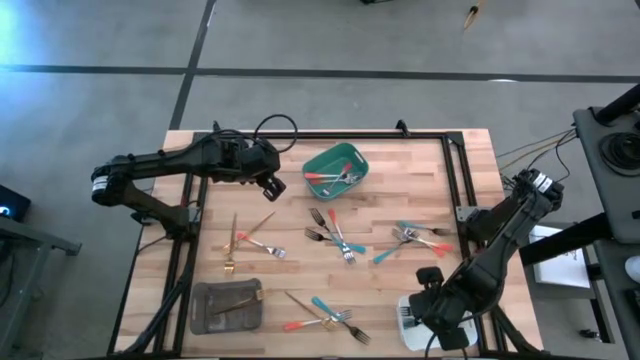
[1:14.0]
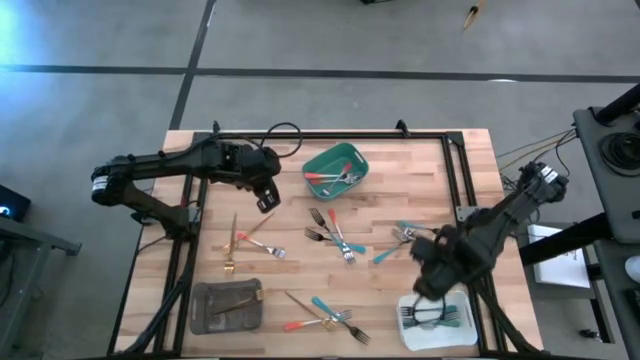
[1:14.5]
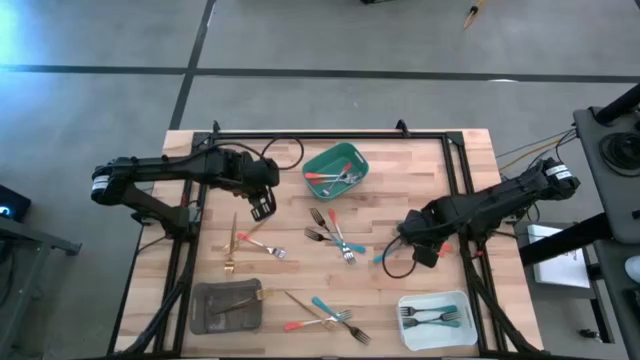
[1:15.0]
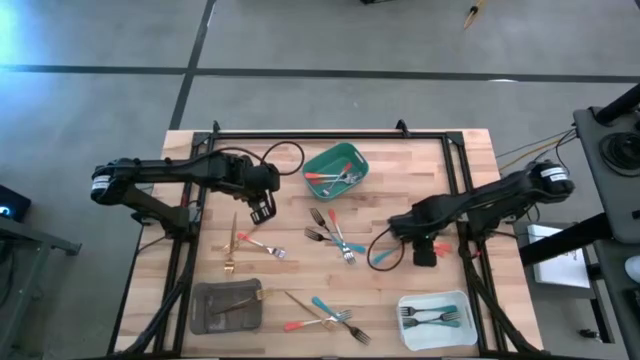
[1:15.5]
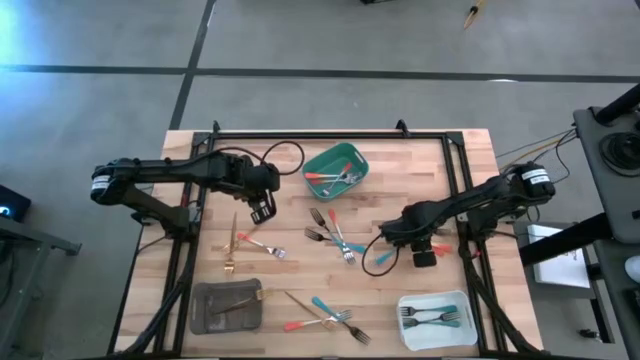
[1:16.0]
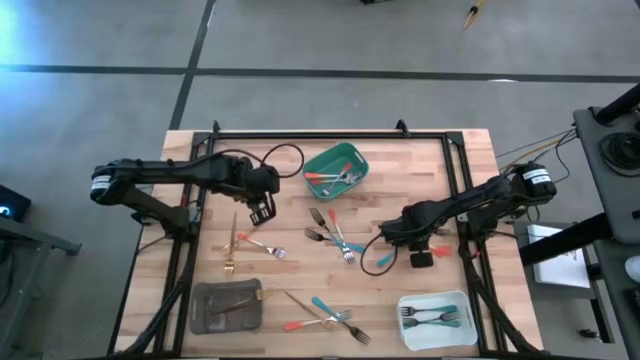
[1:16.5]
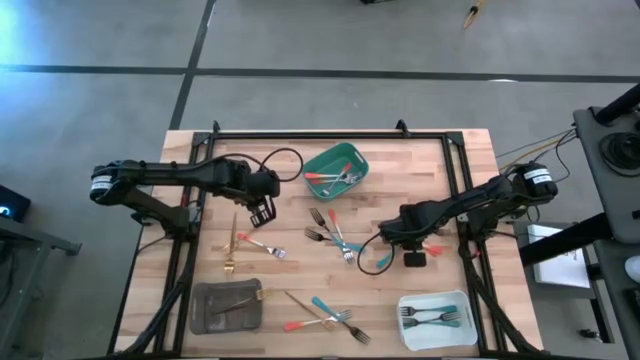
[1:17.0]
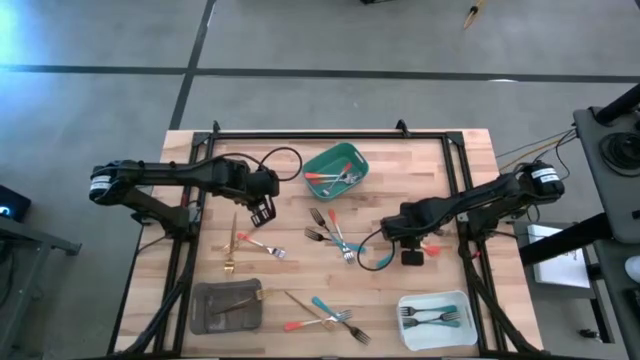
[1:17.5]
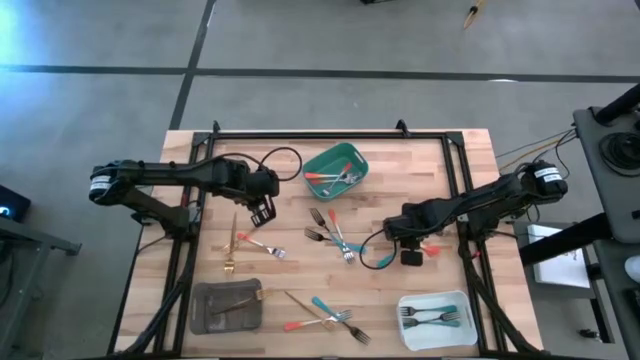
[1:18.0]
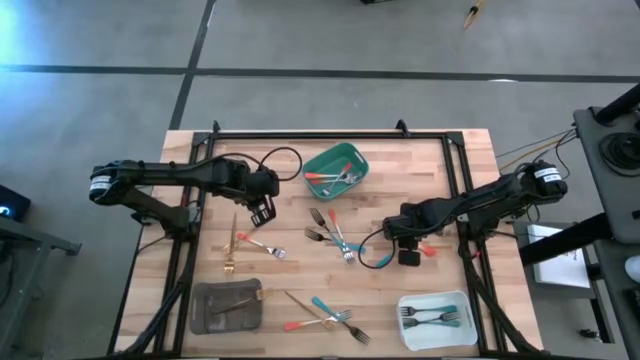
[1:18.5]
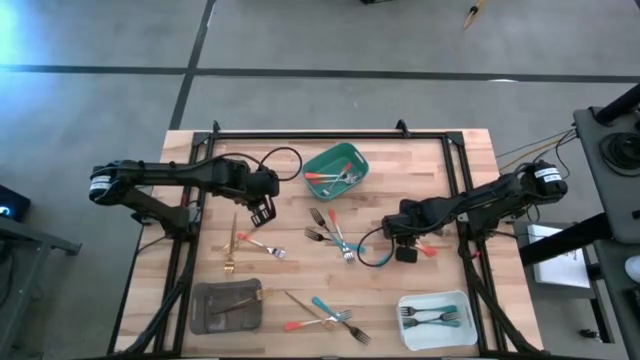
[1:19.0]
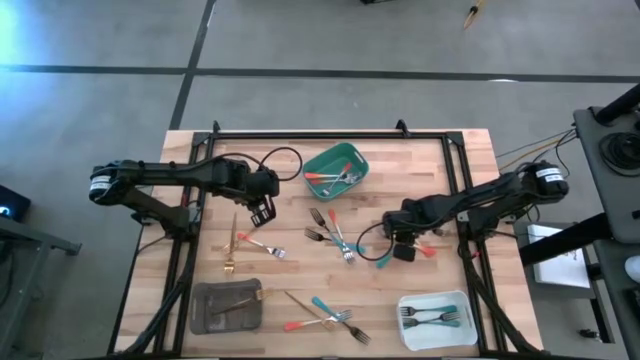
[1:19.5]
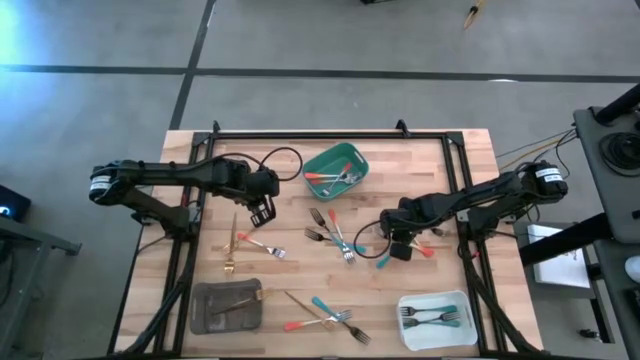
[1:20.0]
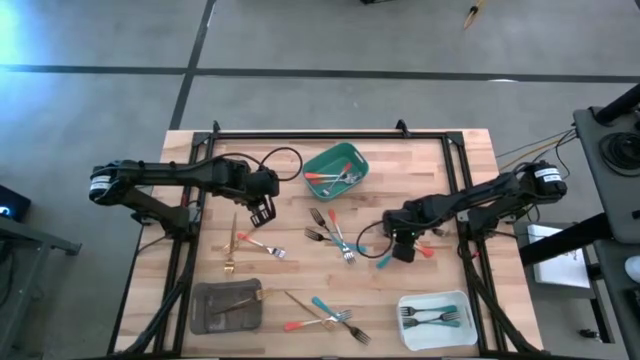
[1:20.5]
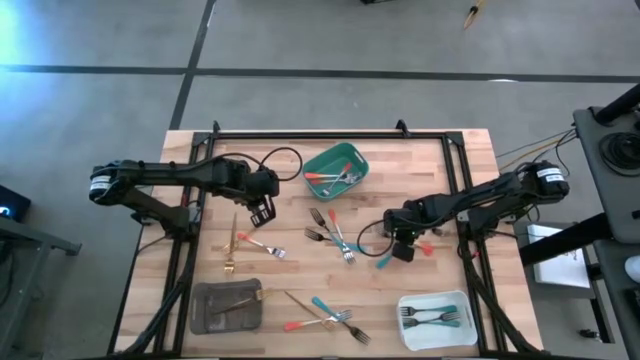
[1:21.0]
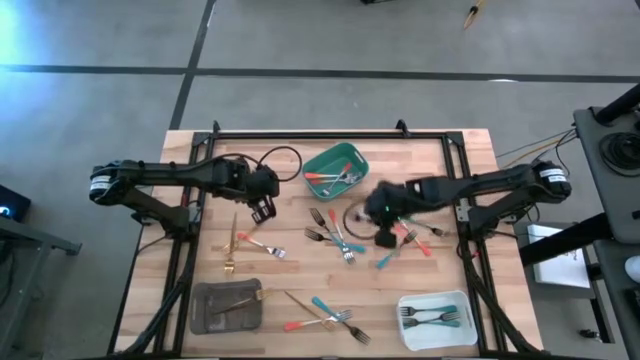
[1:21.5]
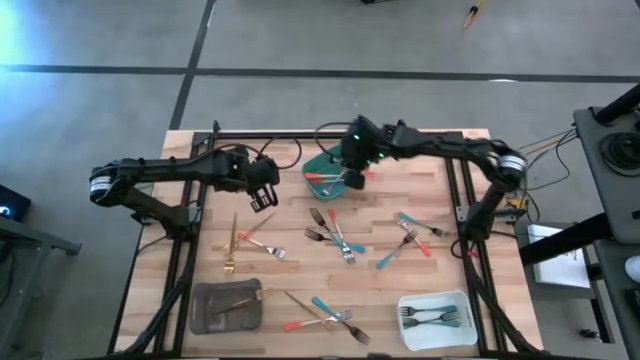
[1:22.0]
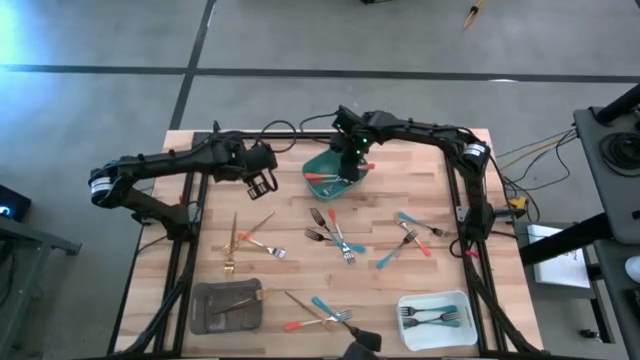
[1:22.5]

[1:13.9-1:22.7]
Task: Sort silverware by color (type)
Put the orange fork into the green bin

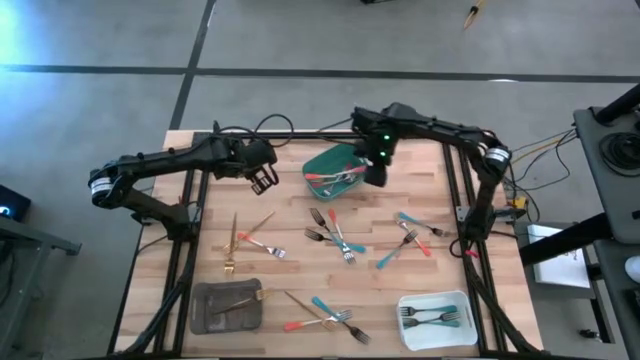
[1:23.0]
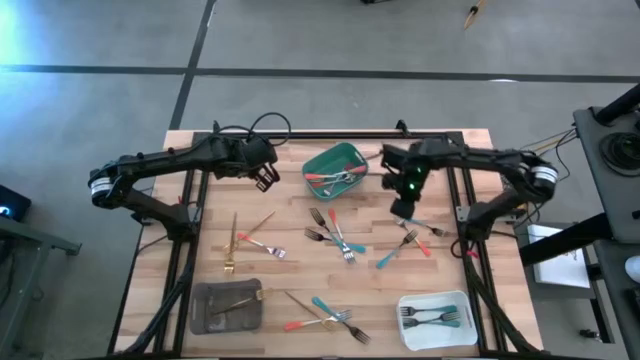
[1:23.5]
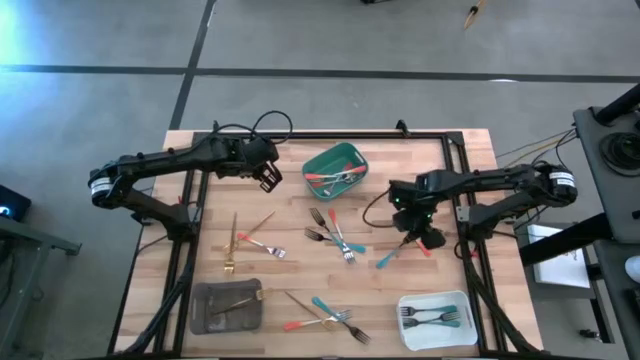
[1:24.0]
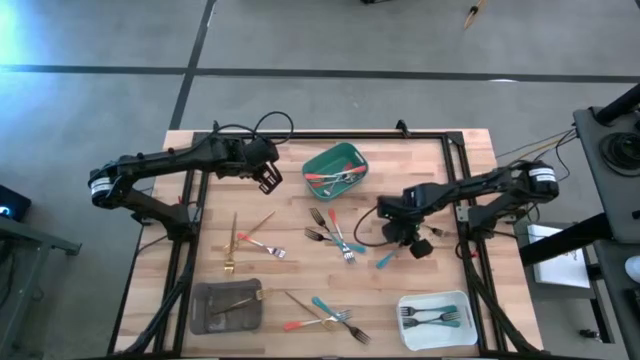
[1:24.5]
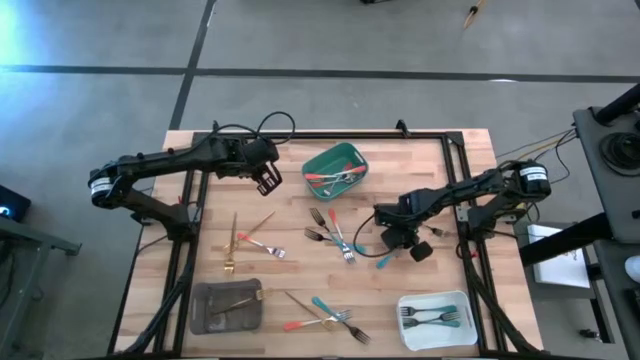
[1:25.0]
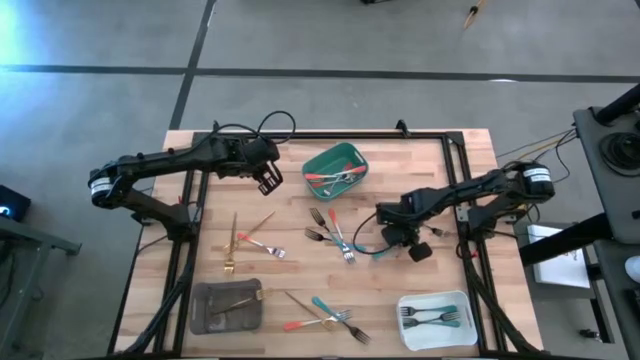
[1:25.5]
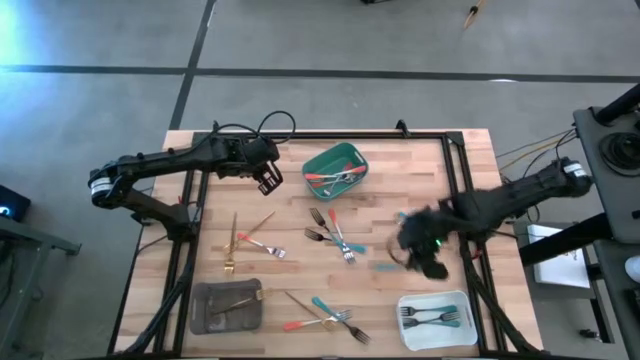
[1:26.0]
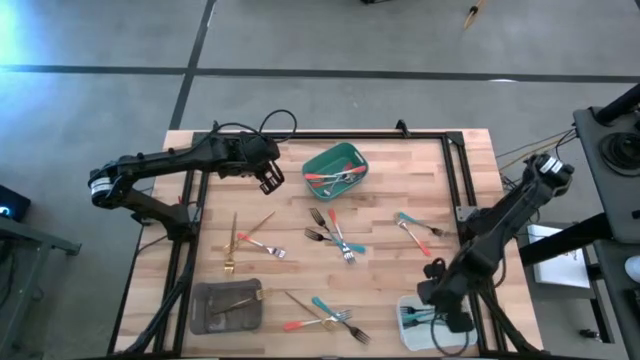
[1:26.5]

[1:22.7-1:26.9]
Put the blue fork into the white bin

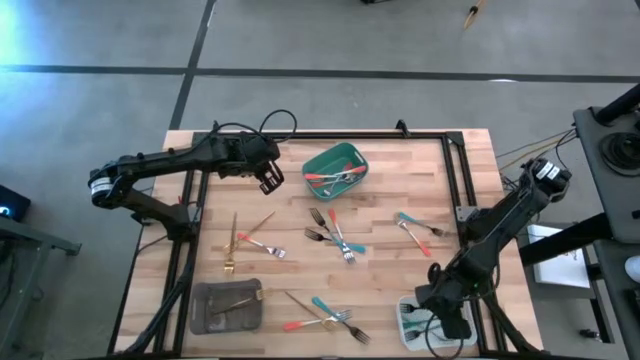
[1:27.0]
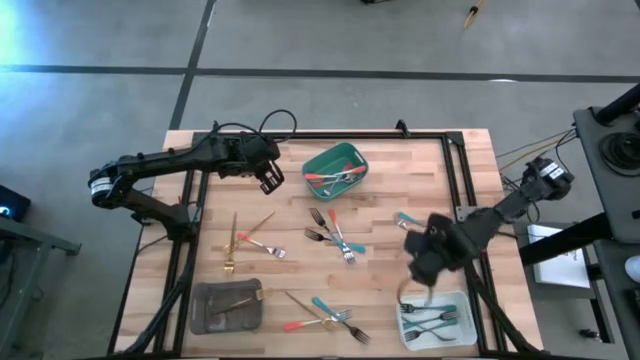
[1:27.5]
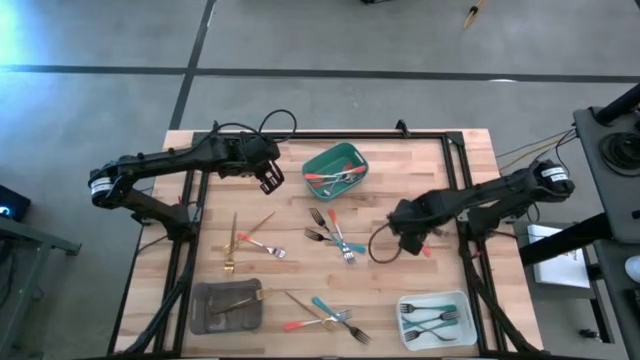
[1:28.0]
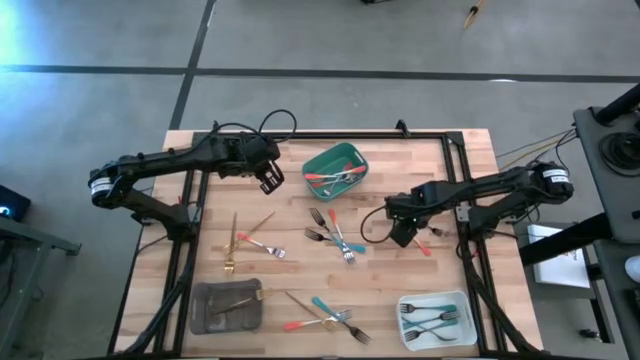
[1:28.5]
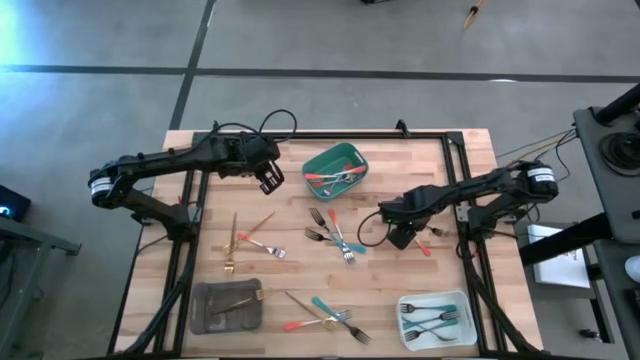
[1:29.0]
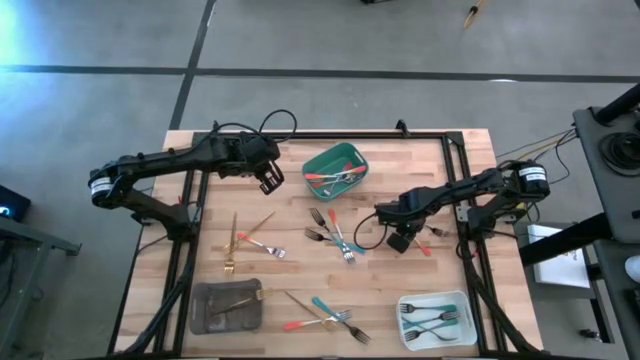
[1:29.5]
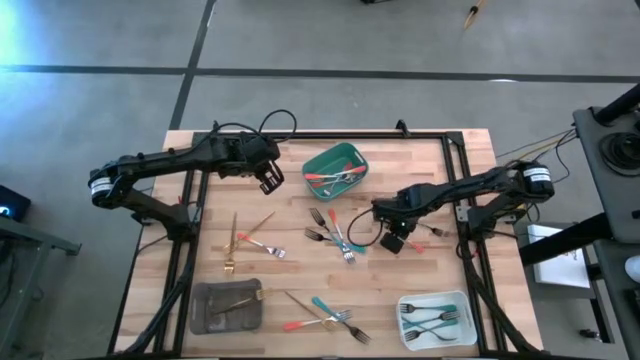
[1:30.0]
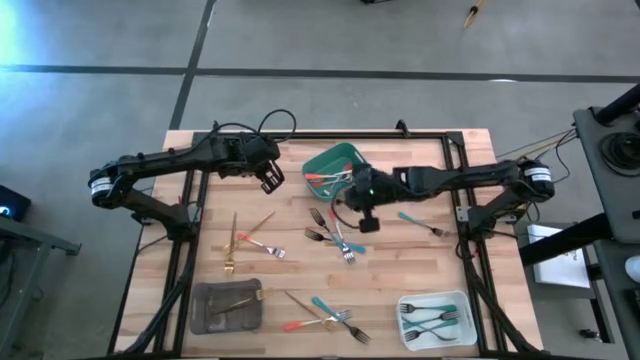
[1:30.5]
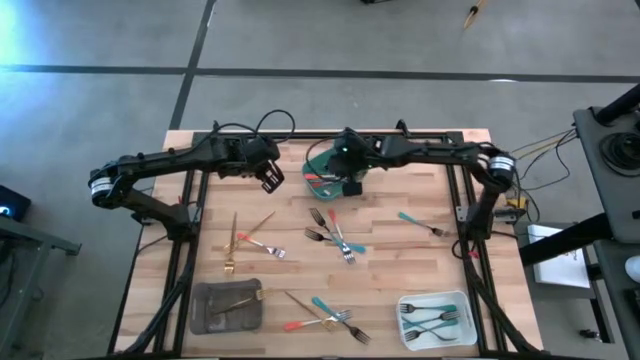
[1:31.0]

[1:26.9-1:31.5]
Put the orange fork into the green bin

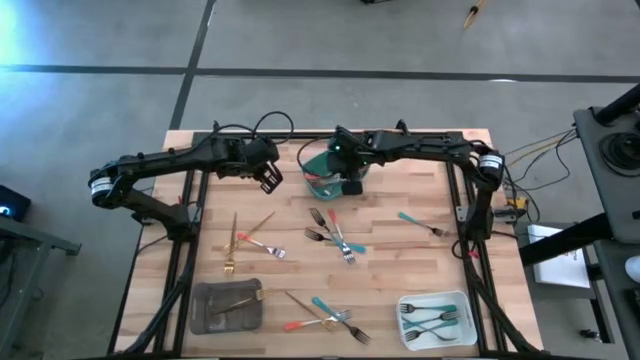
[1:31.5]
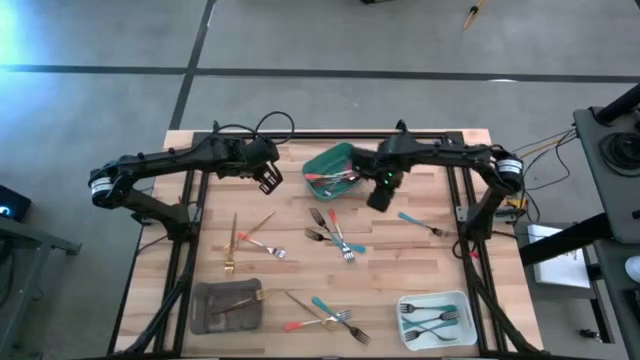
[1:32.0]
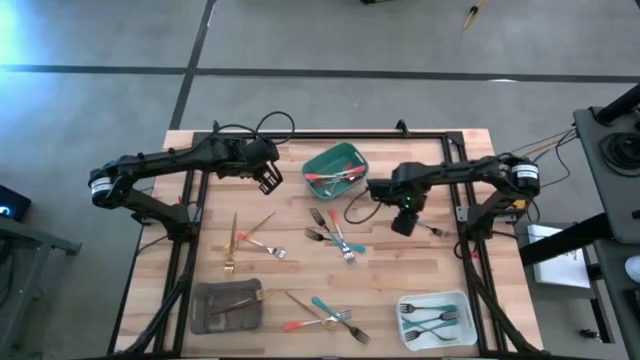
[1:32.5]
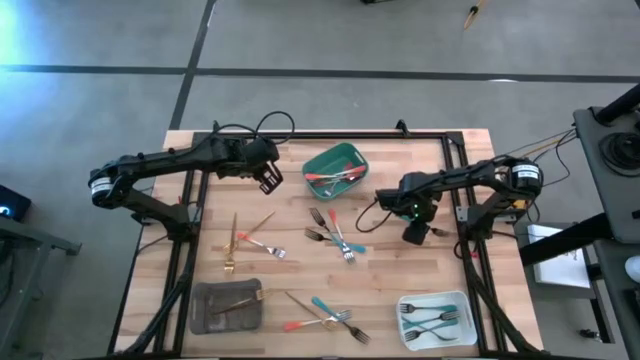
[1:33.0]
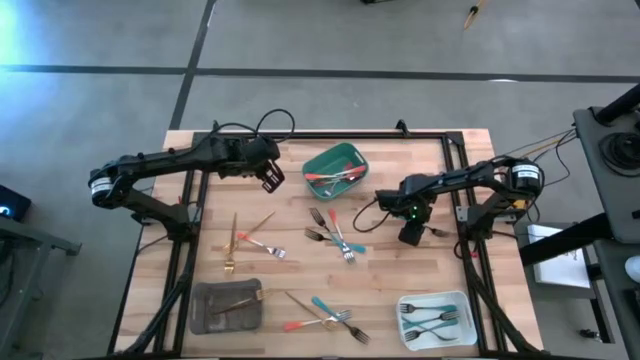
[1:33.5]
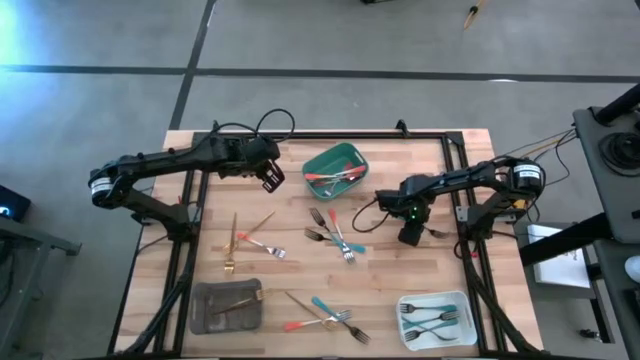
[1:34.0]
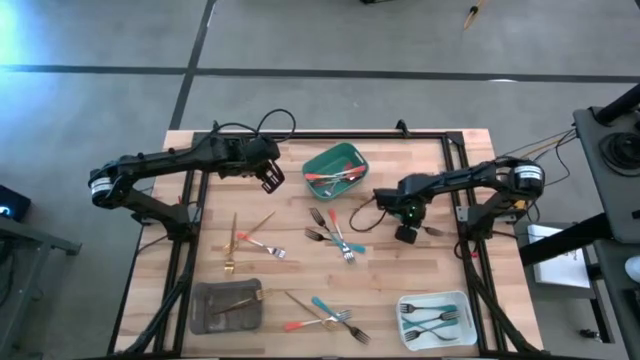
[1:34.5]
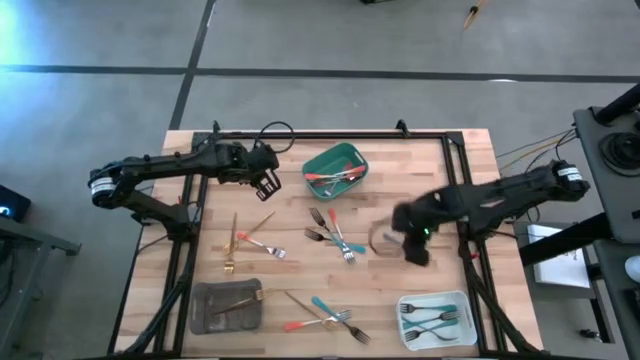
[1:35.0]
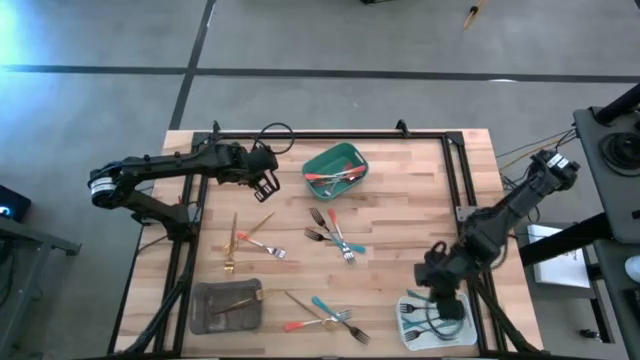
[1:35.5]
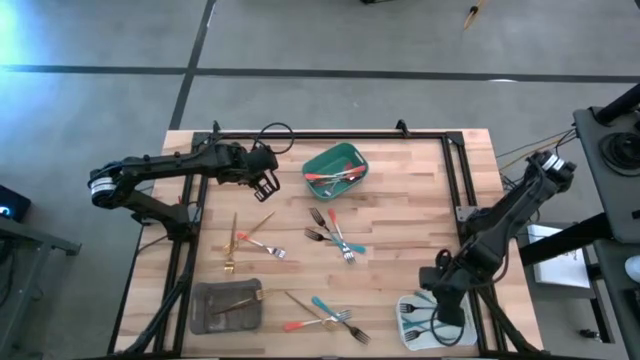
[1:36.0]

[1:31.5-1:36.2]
Put the blue fork into the white bin
